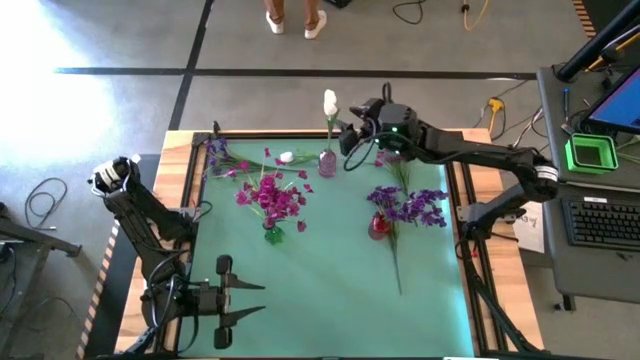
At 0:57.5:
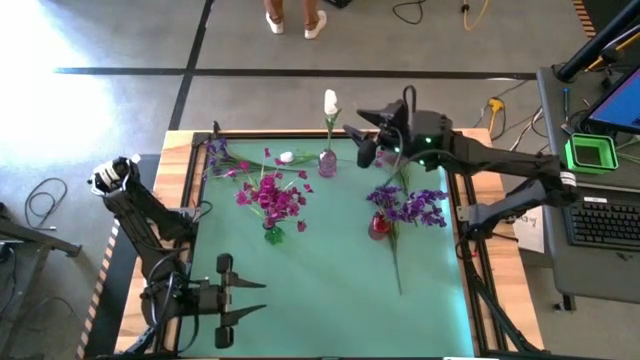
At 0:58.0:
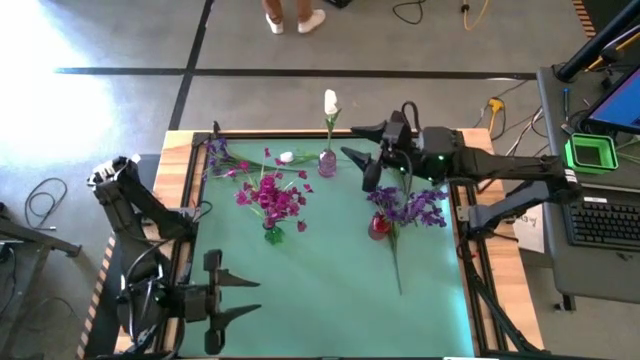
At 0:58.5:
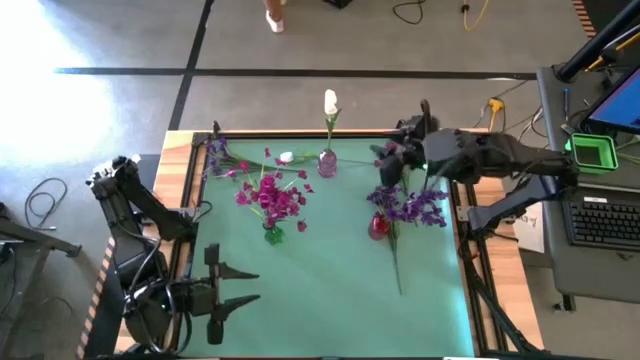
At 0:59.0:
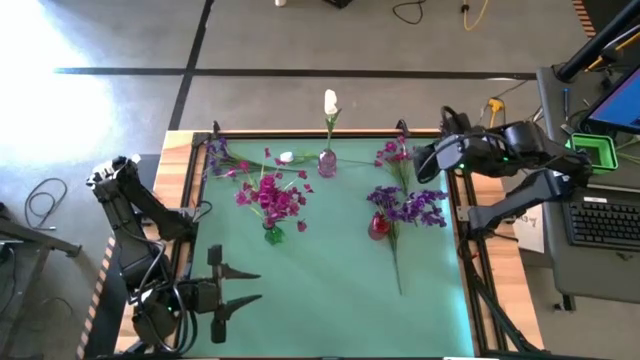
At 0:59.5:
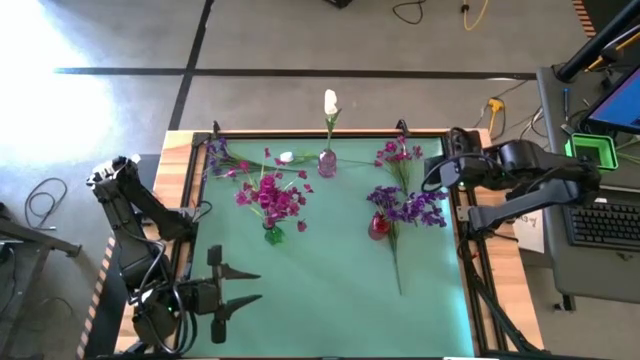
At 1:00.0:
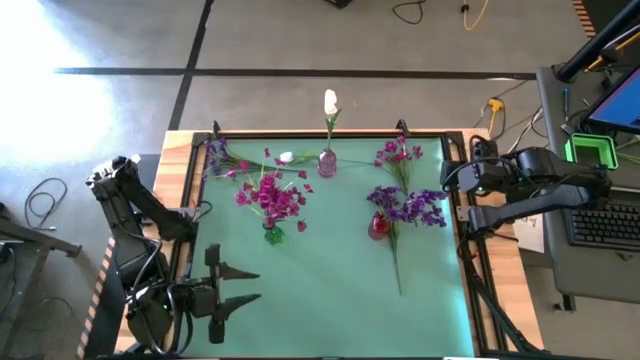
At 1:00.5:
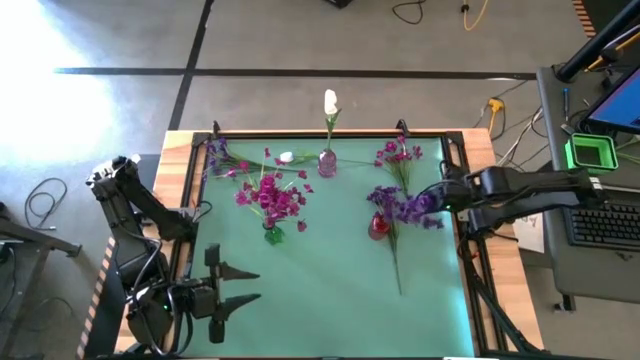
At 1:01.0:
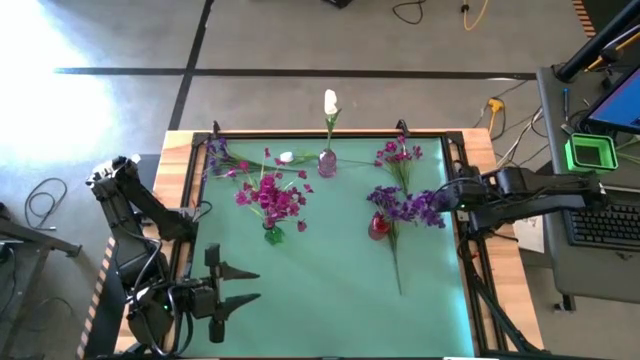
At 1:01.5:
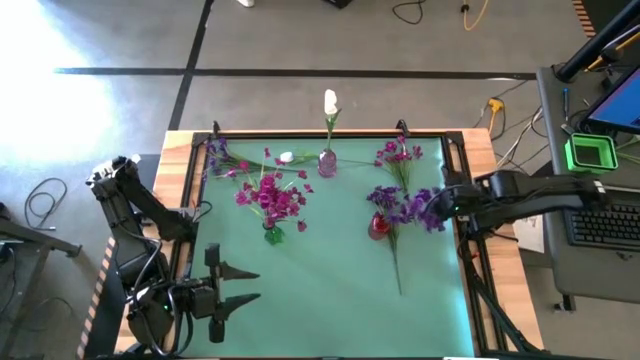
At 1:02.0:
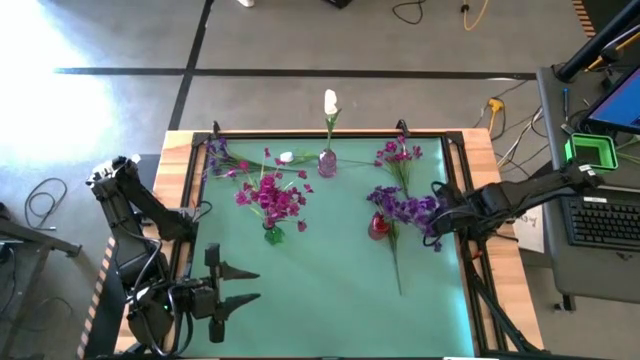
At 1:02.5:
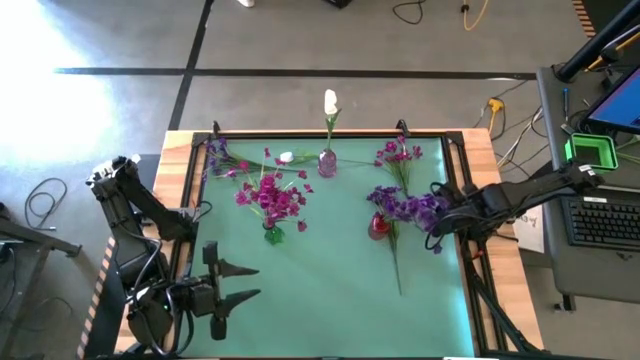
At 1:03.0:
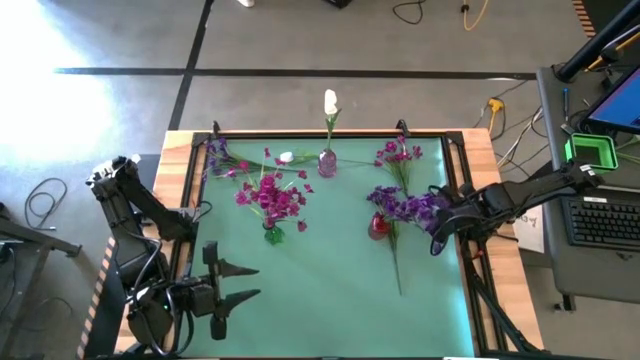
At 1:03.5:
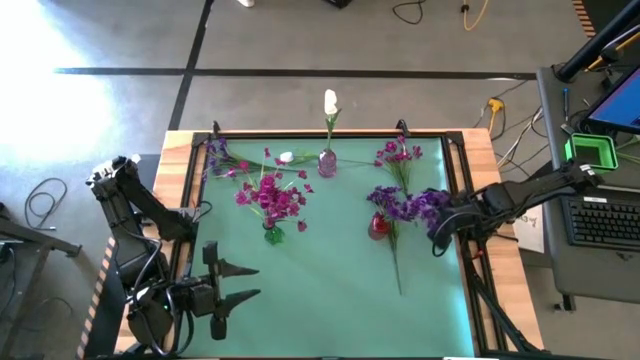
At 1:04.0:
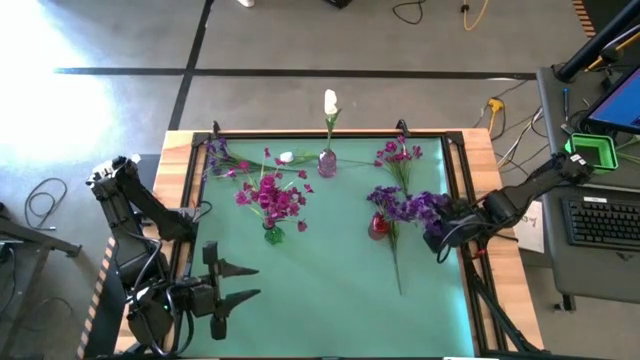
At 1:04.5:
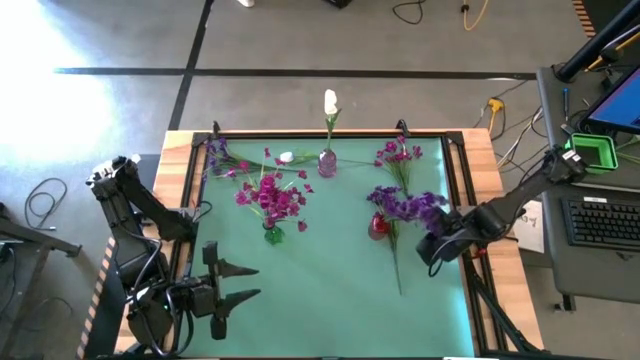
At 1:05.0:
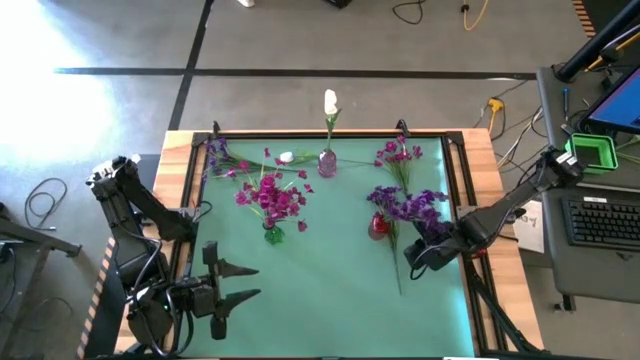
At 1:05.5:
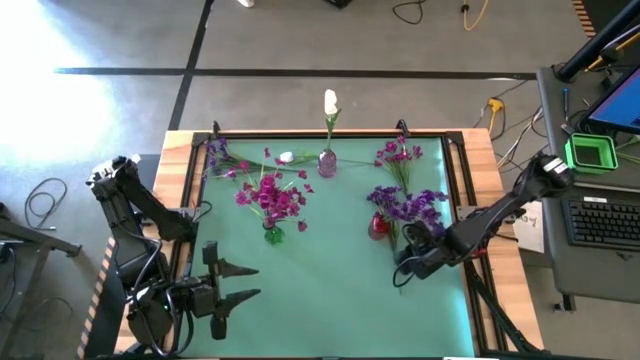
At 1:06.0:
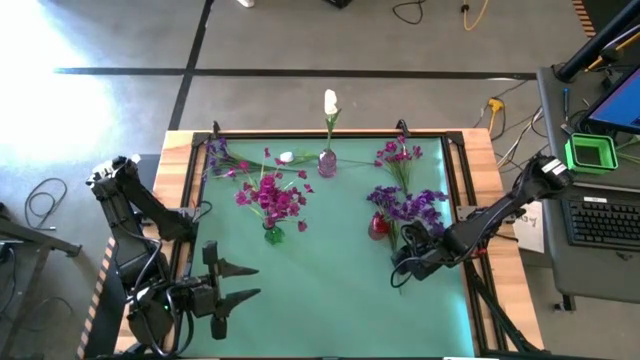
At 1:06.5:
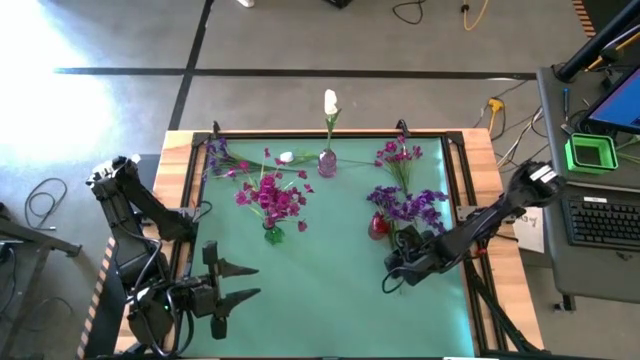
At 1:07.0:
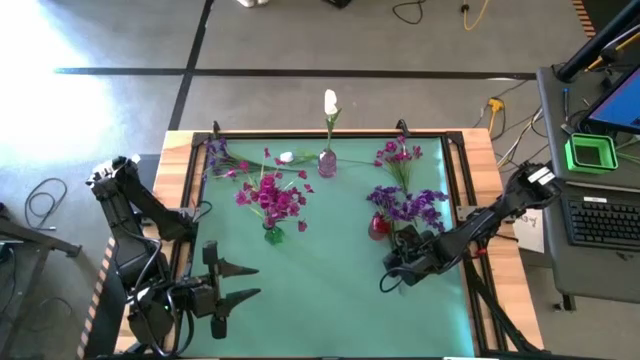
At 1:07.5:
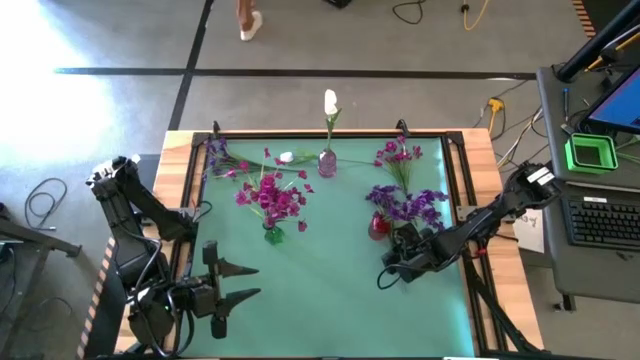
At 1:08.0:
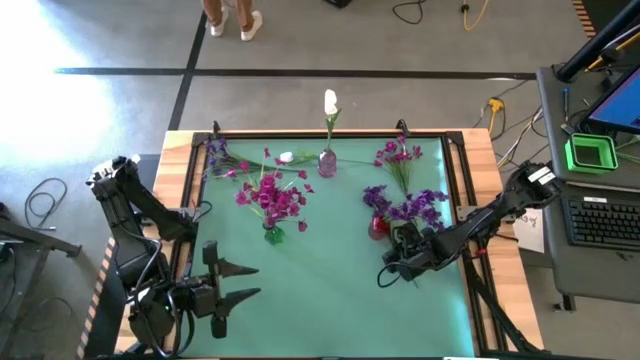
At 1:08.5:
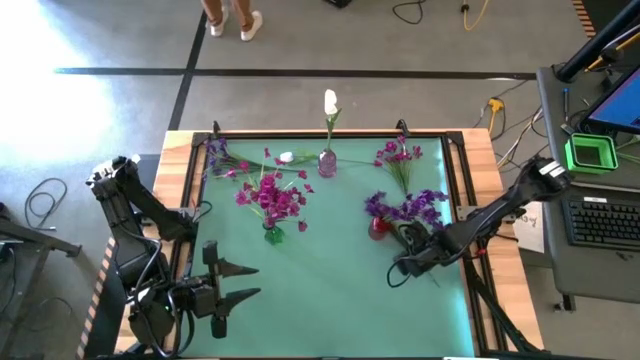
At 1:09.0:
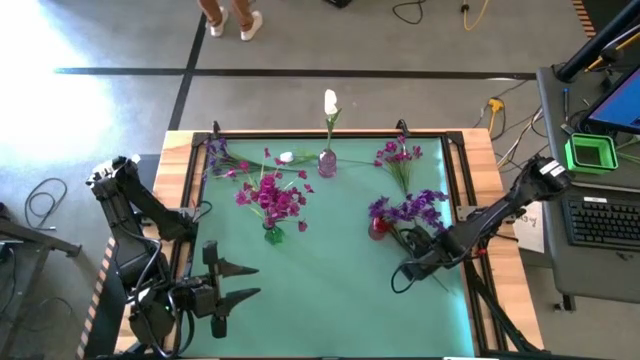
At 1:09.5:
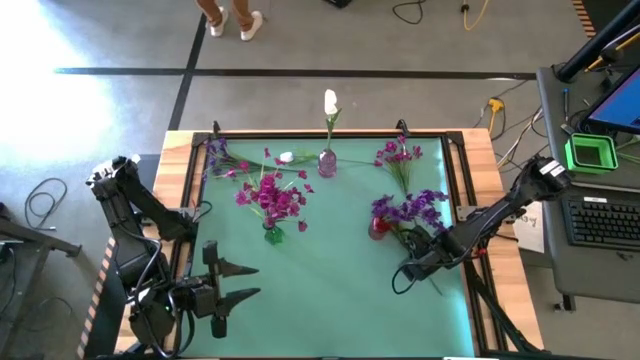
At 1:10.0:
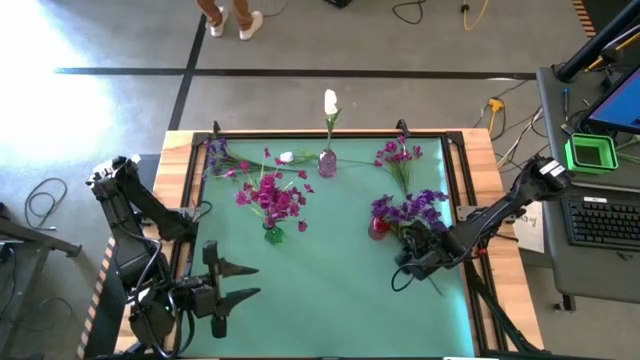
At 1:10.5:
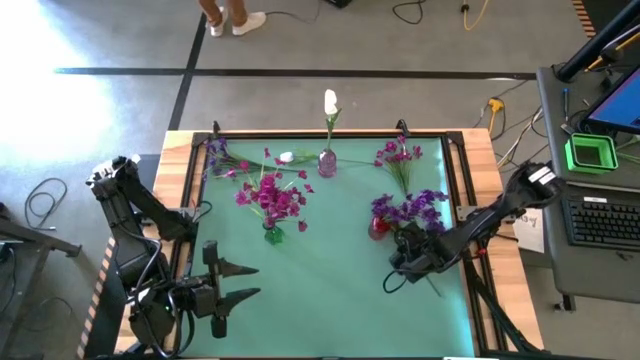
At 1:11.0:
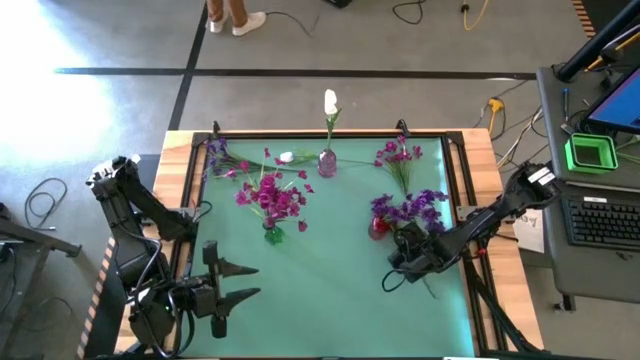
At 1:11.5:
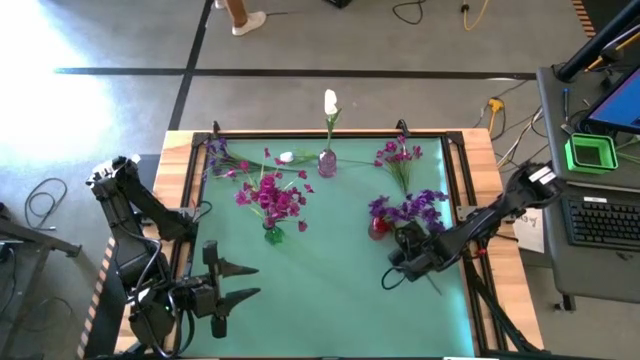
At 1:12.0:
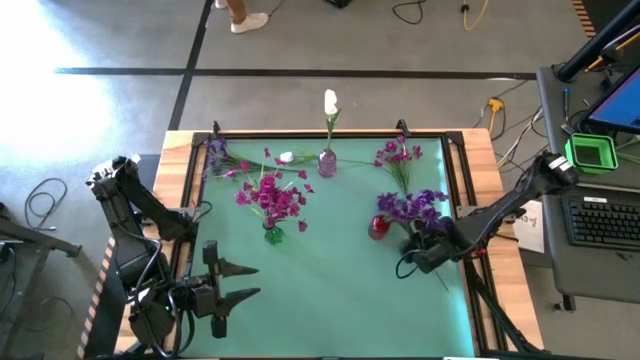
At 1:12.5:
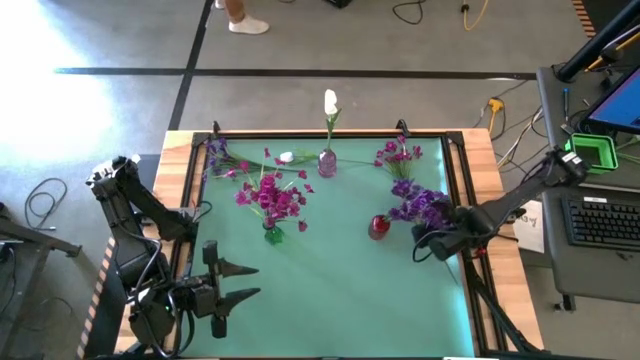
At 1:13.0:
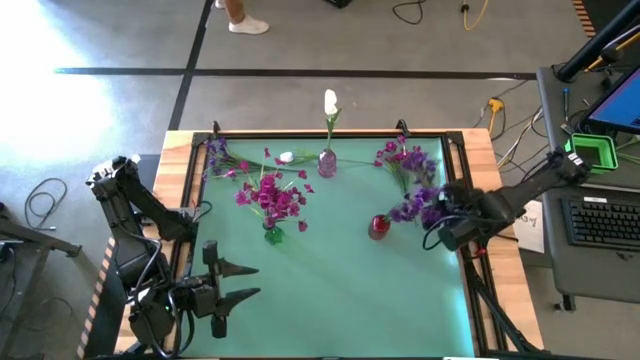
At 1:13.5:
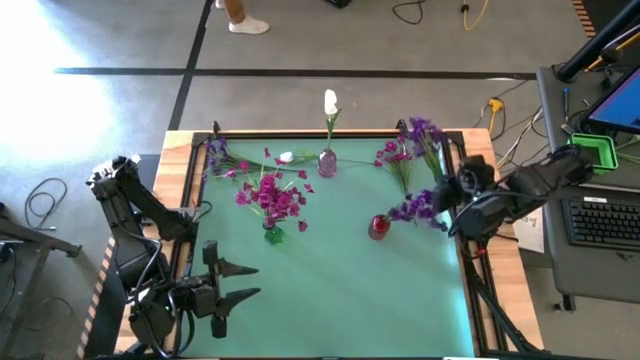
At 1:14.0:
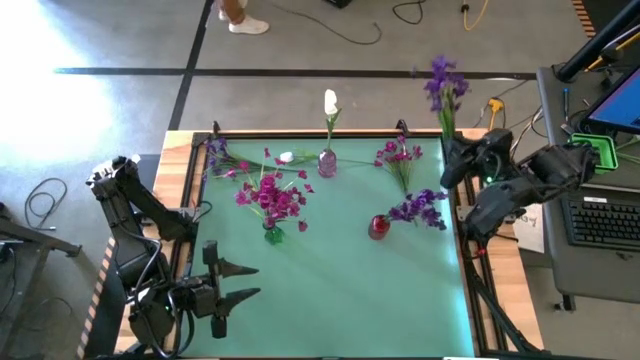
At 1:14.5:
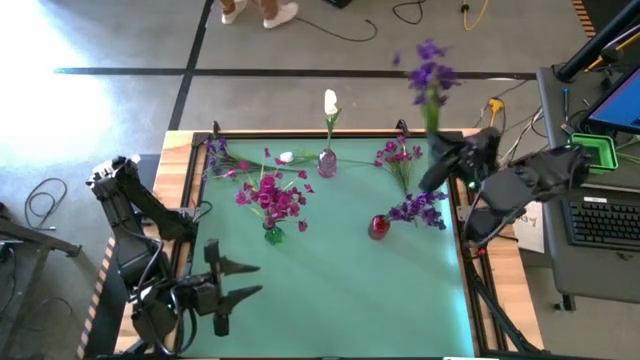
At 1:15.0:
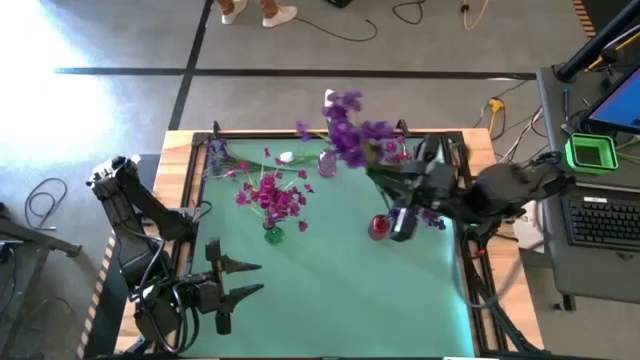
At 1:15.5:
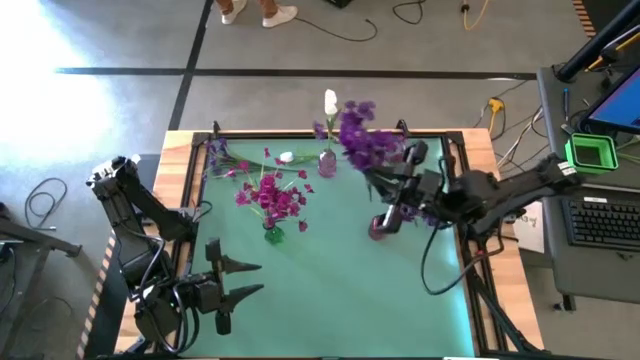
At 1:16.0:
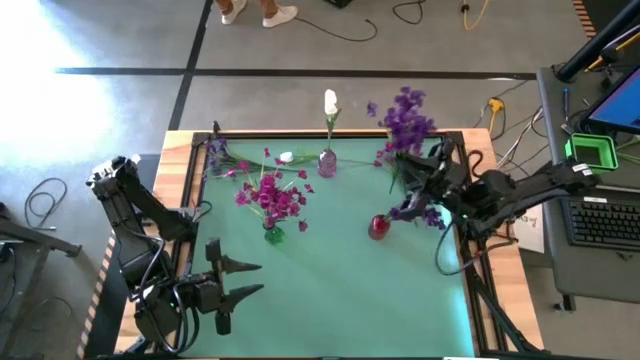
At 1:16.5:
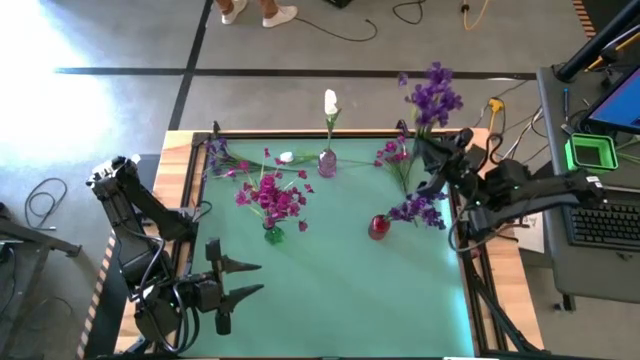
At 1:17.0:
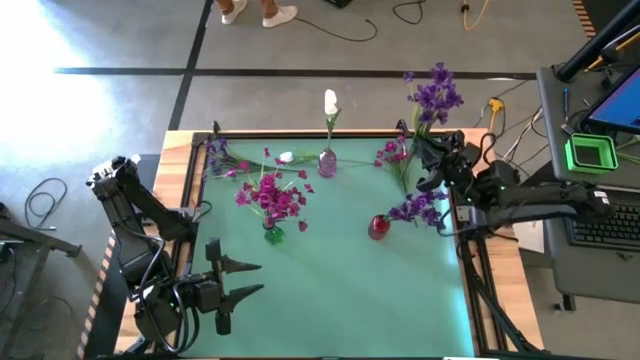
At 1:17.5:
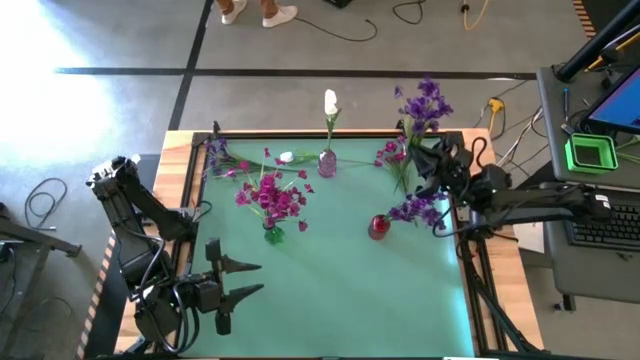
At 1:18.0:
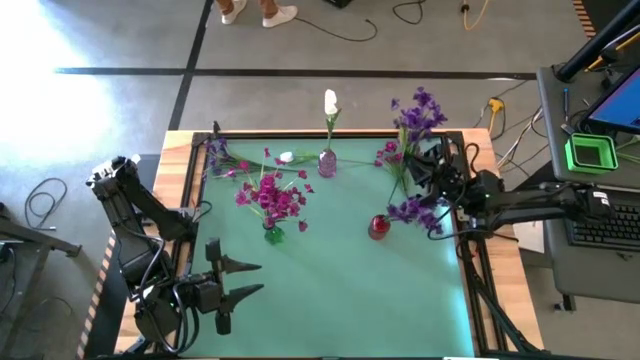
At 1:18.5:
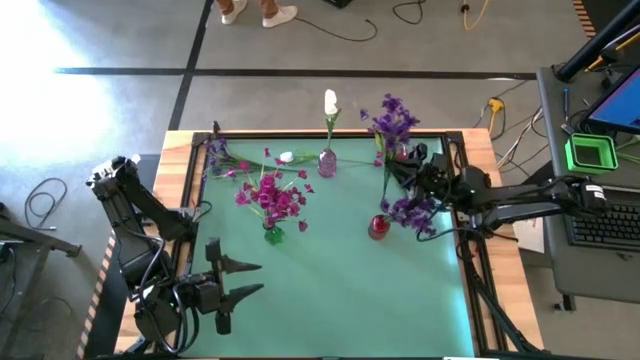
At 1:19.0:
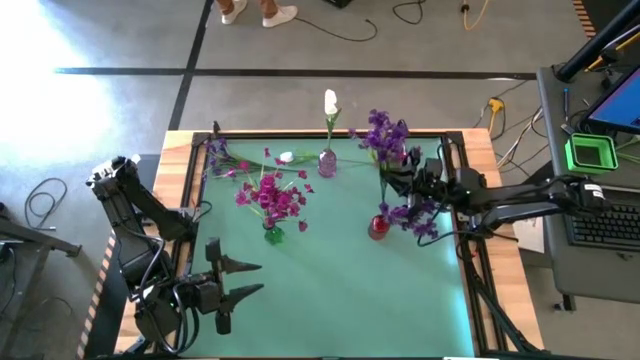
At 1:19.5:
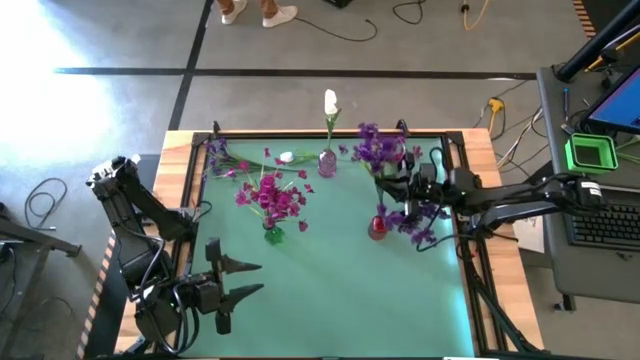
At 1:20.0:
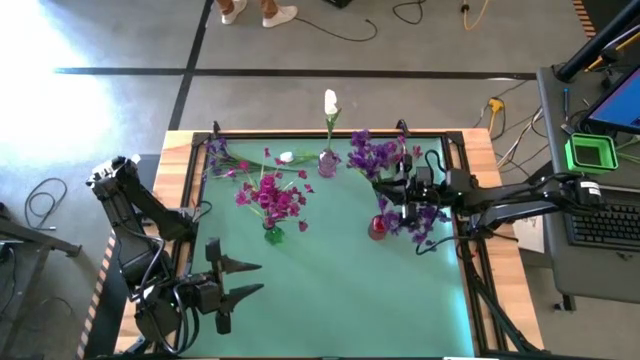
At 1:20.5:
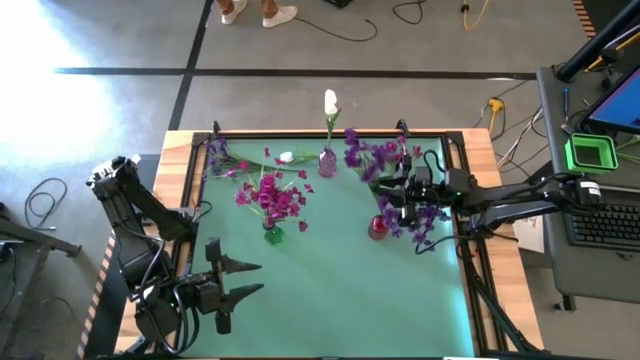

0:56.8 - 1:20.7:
Task: Sort flowers into vase by color
Put the bottom violet flowers into the red flower vase
